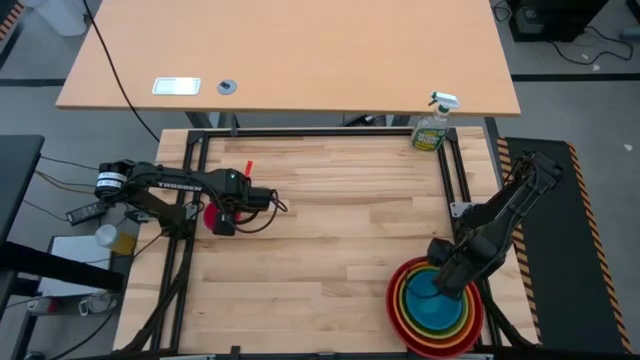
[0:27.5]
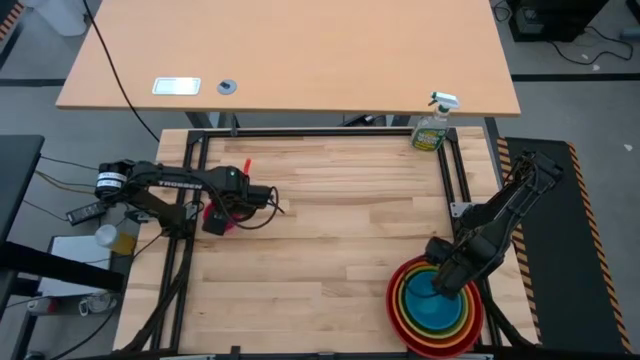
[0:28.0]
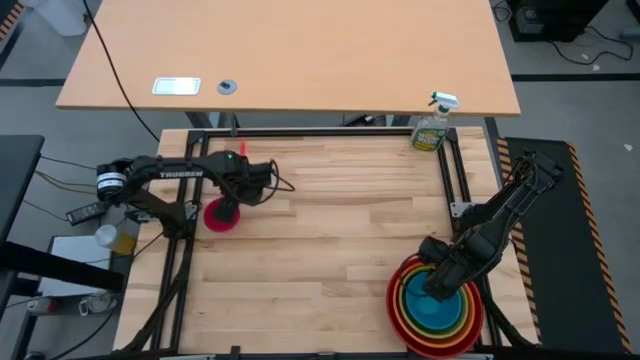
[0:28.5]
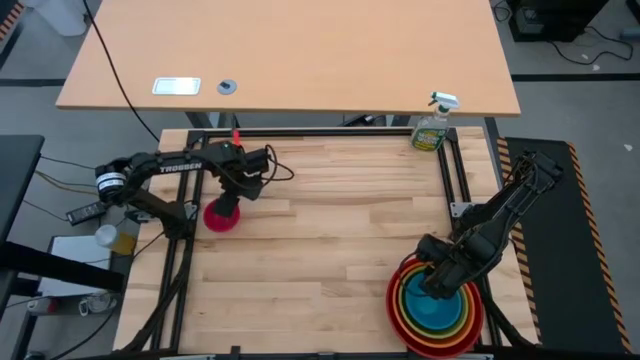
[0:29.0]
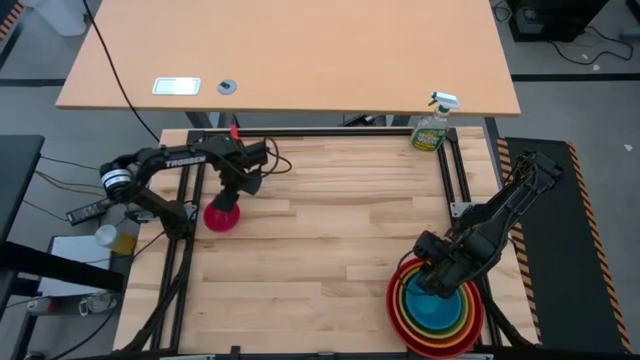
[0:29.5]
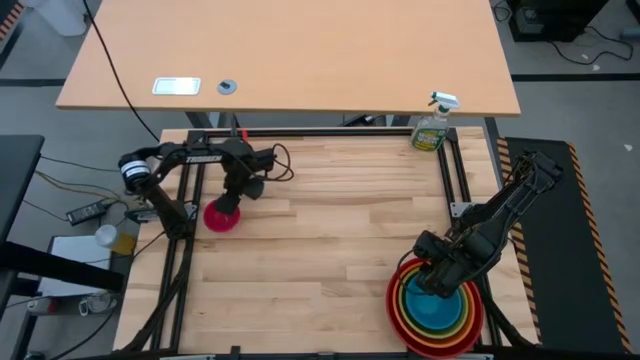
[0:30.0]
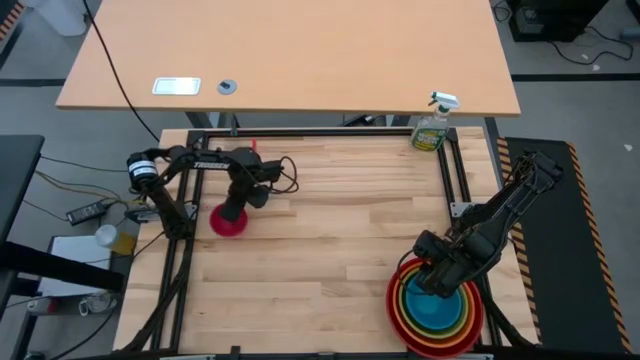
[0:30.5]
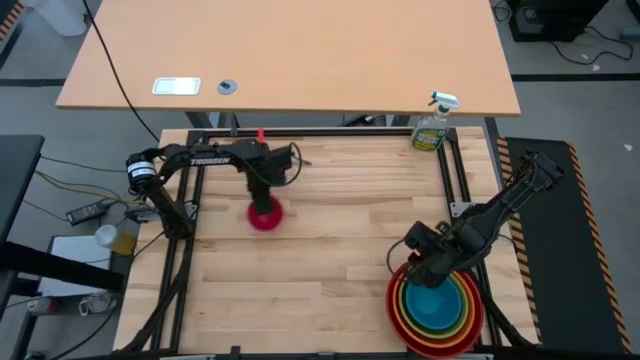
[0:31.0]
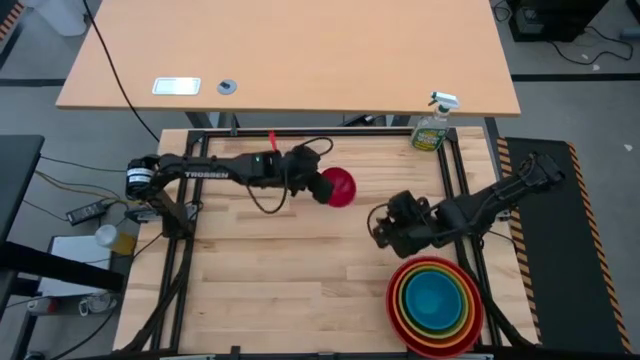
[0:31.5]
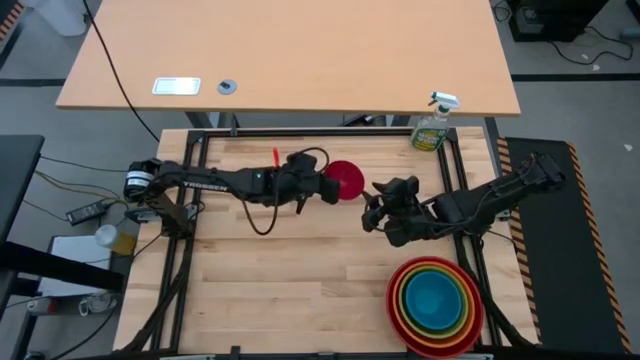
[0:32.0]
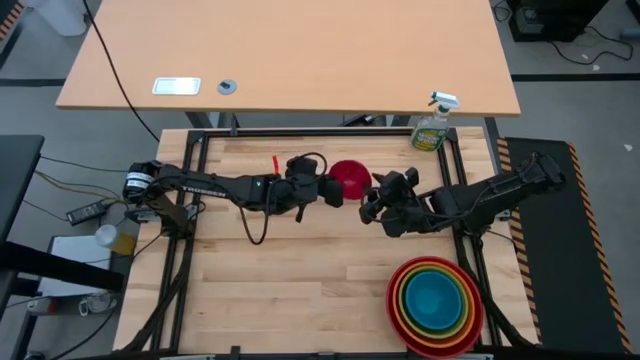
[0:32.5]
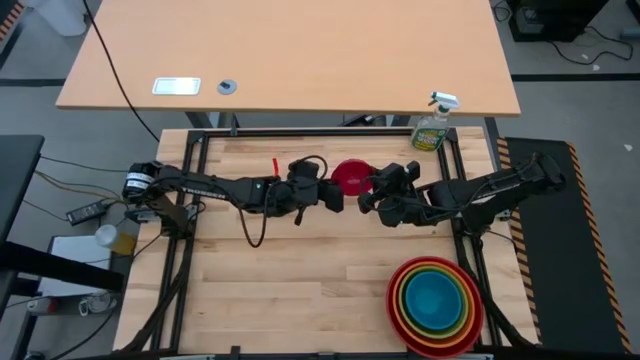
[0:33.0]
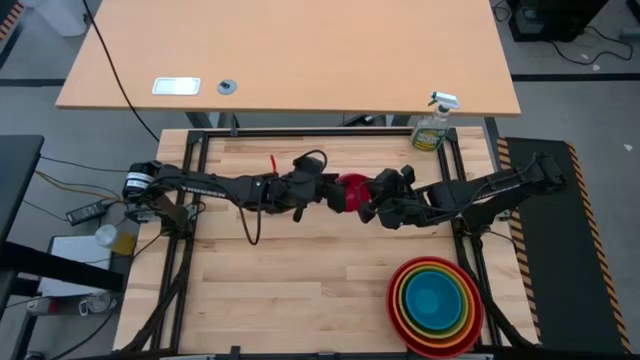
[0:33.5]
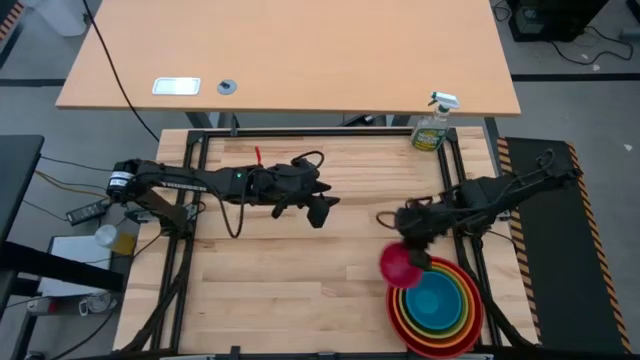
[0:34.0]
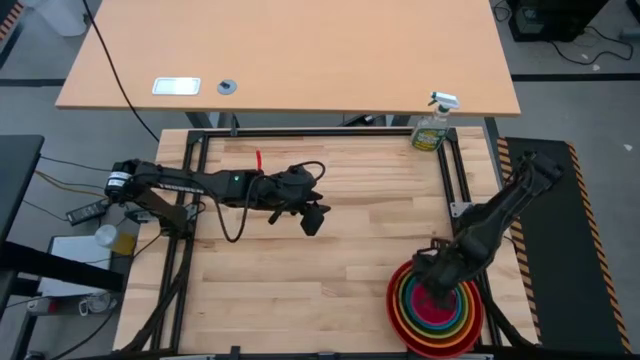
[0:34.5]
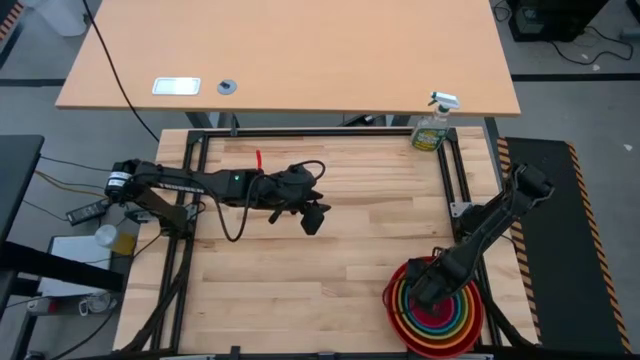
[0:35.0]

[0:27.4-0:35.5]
Stack the extra small pink bowl on top of the small blue bowl

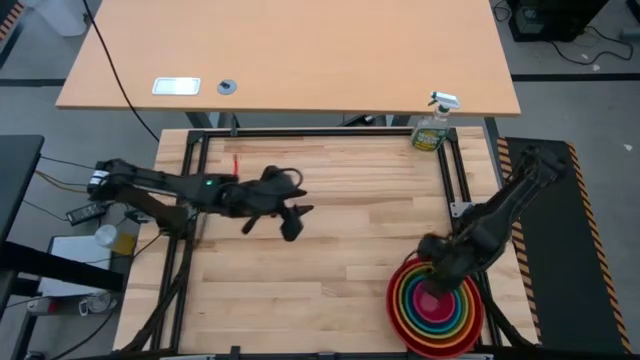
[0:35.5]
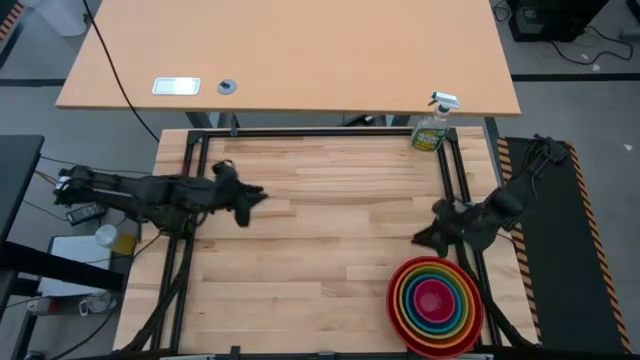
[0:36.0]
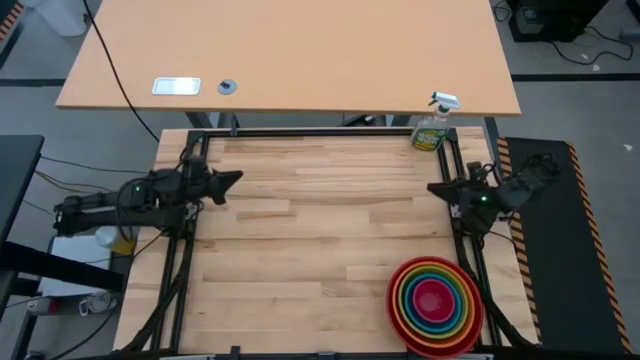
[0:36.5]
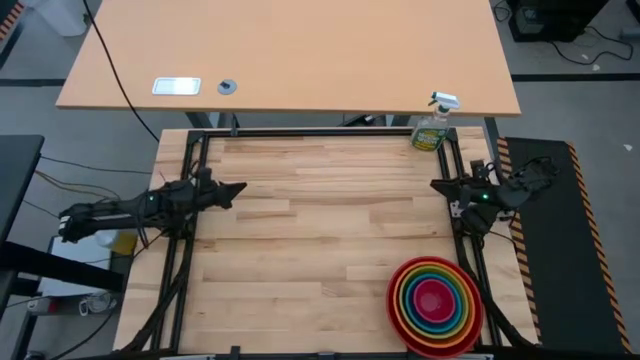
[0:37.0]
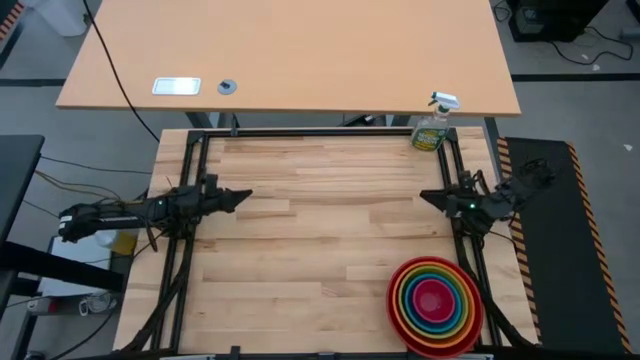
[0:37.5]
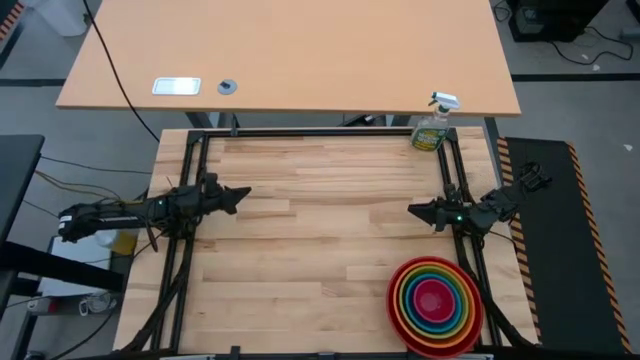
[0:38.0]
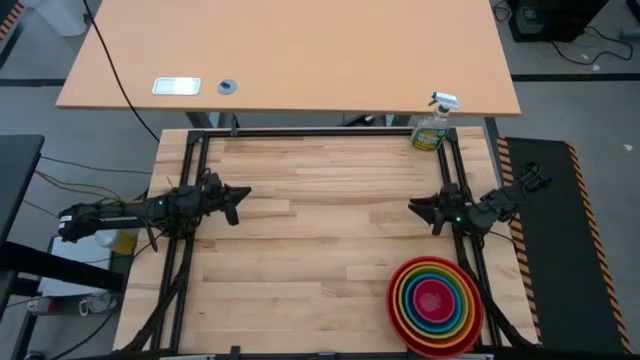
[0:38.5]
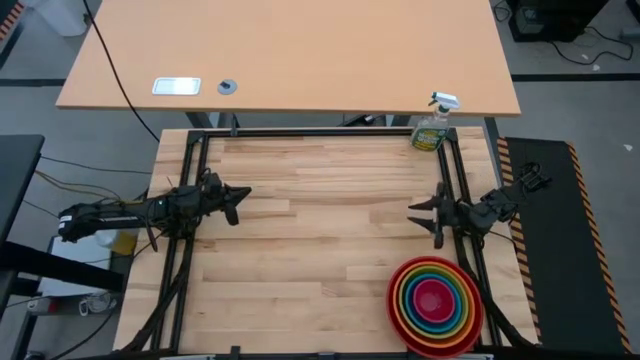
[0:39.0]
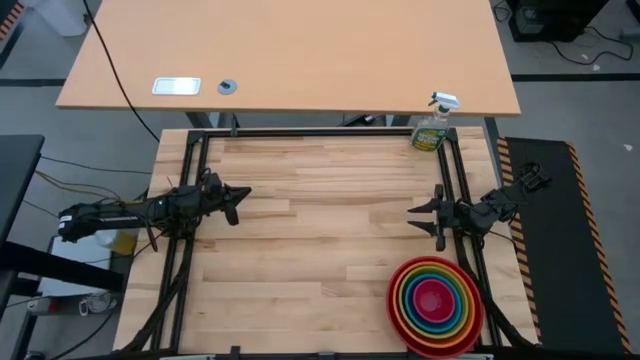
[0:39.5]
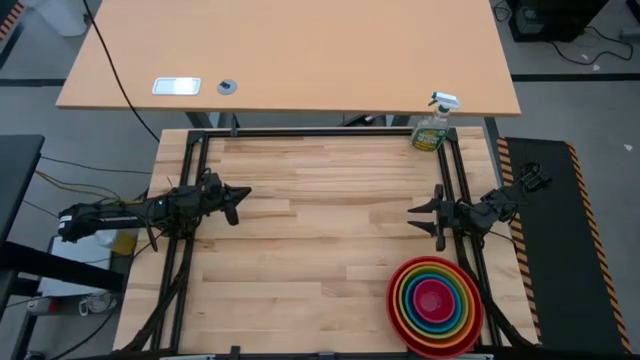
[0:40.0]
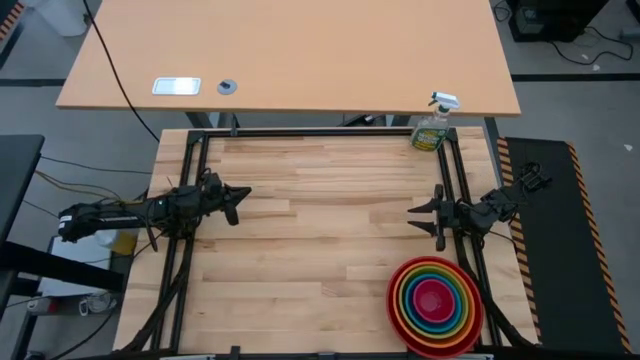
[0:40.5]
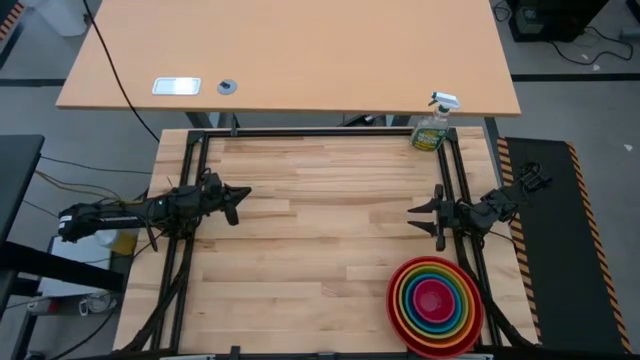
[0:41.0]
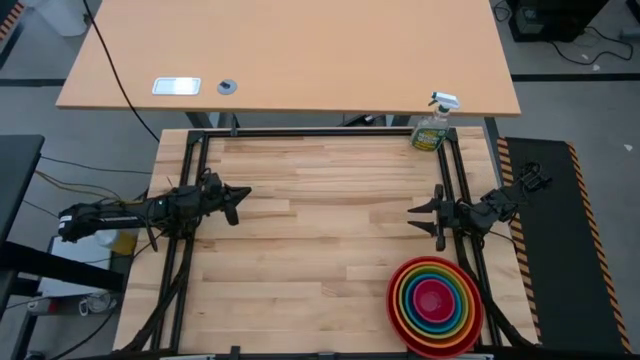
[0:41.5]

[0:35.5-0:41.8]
Return to Home Position

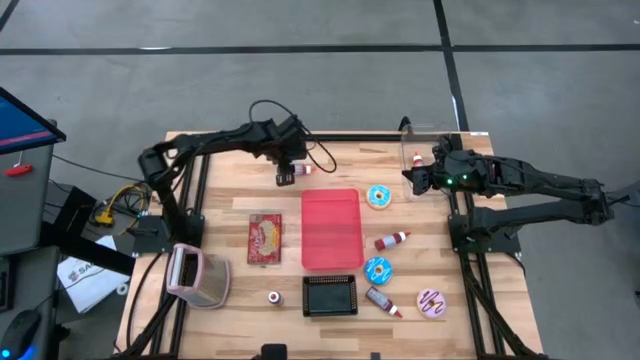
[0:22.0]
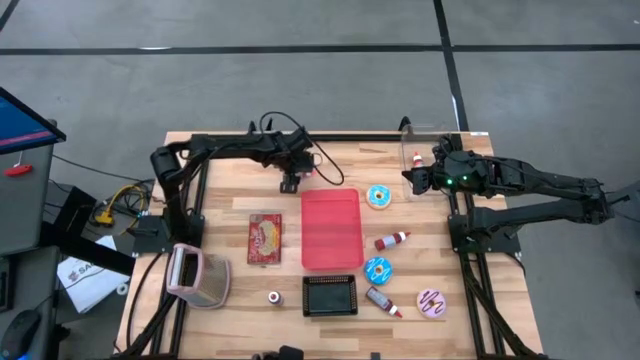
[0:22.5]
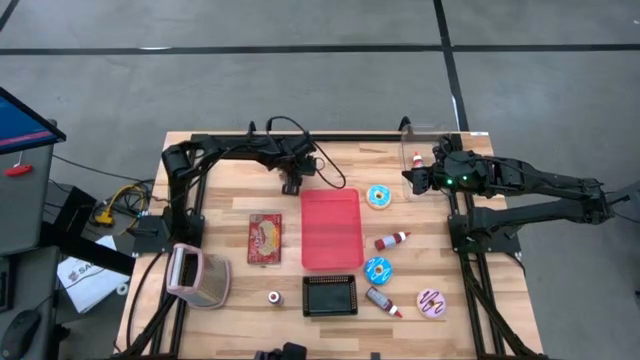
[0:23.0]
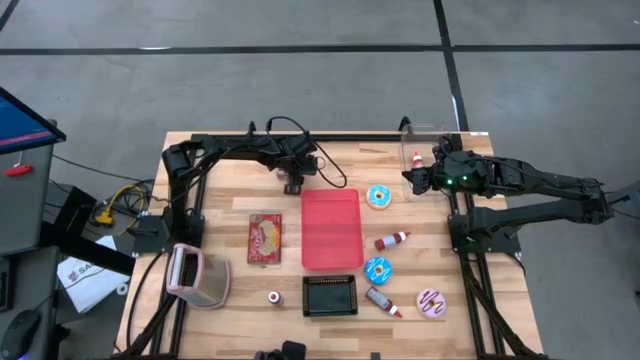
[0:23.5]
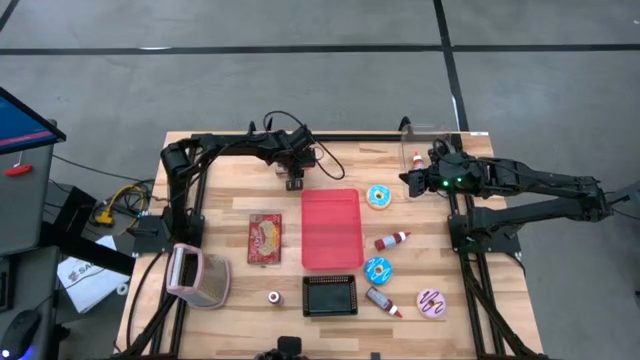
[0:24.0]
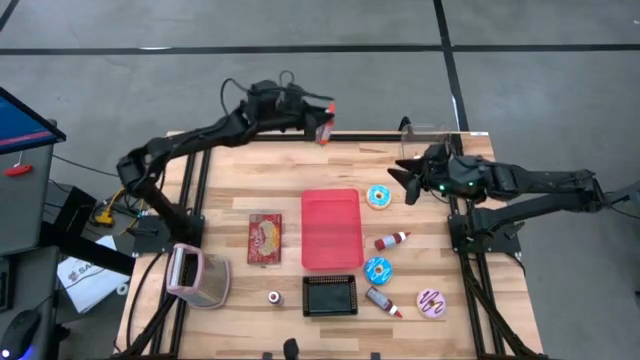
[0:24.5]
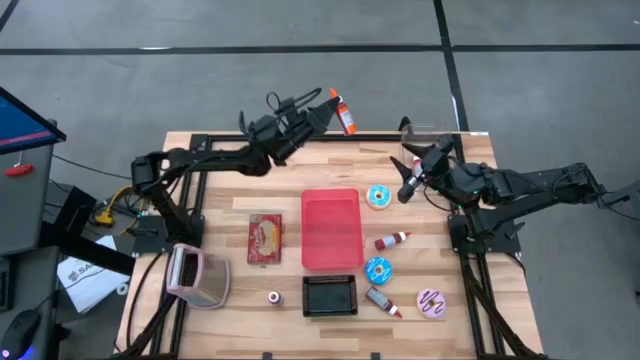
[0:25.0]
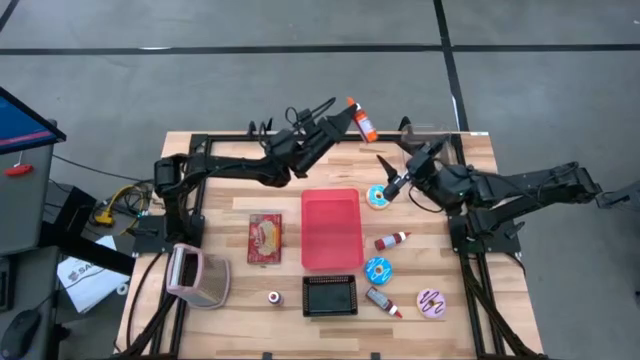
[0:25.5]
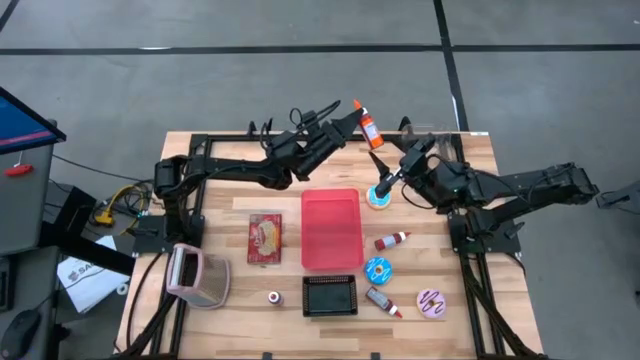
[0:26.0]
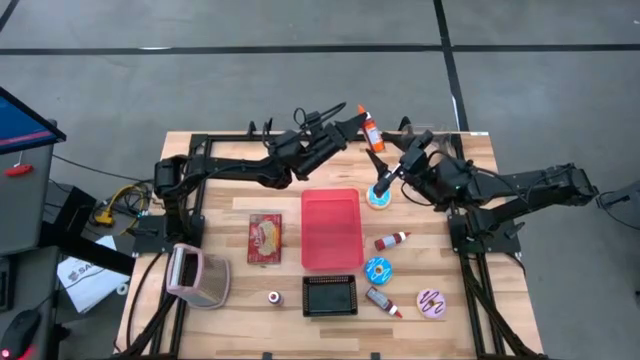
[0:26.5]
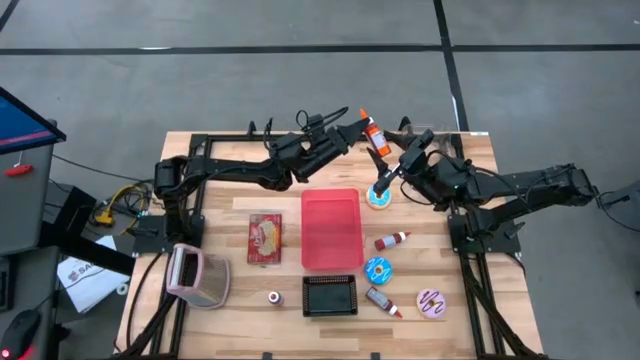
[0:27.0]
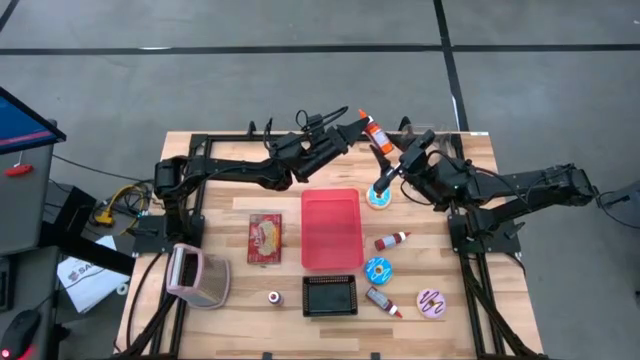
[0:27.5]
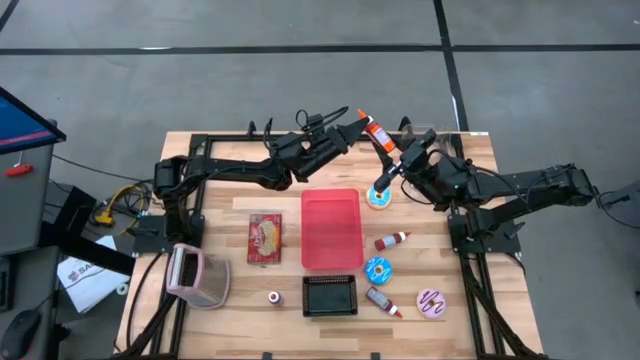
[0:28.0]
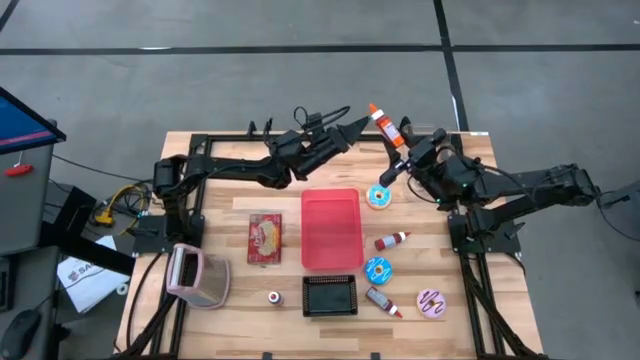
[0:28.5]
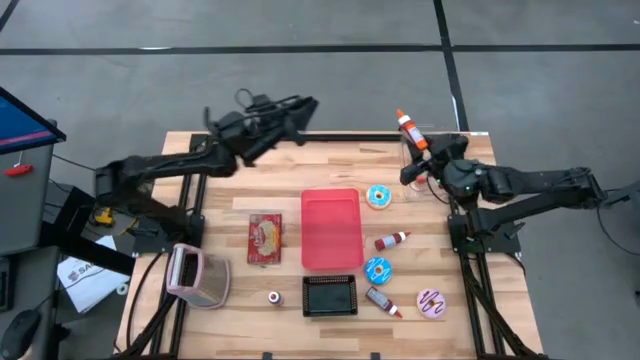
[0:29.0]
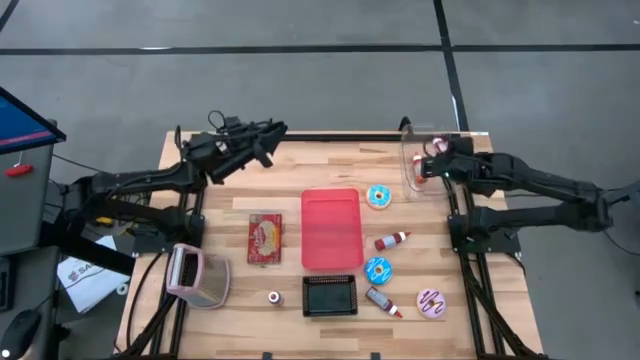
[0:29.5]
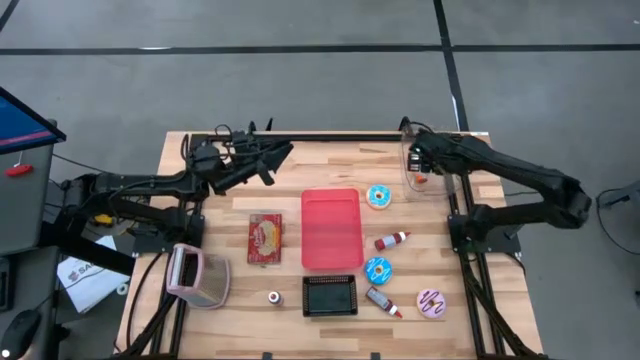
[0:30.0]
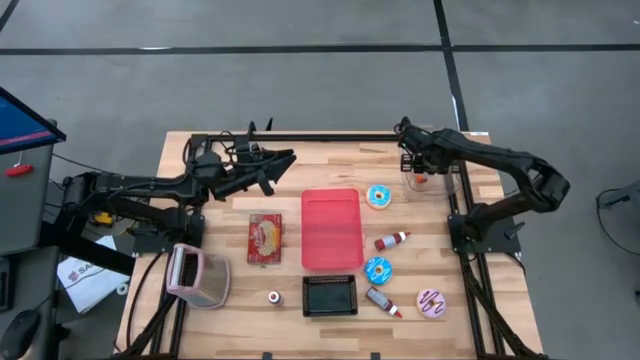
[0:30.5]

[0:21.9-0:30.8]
Put the orange food coloring bottle into the transparent bin
